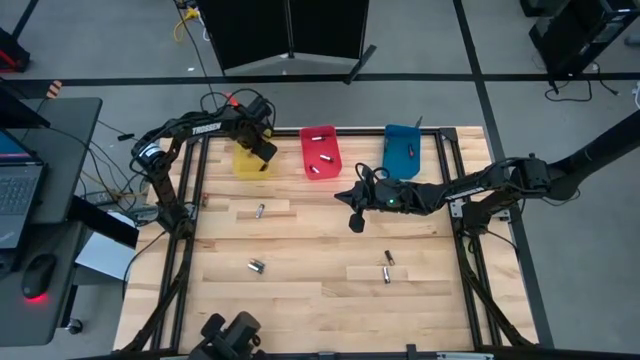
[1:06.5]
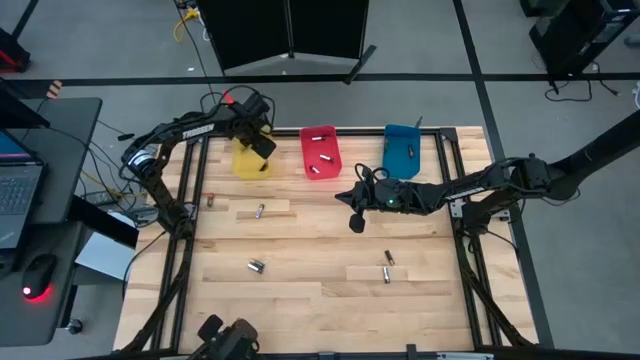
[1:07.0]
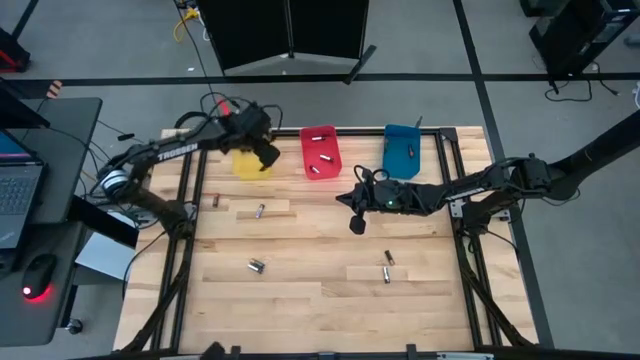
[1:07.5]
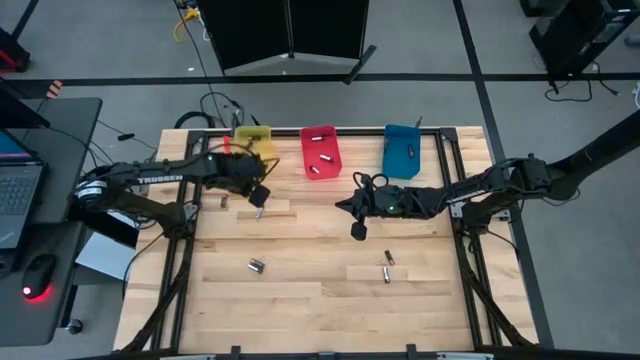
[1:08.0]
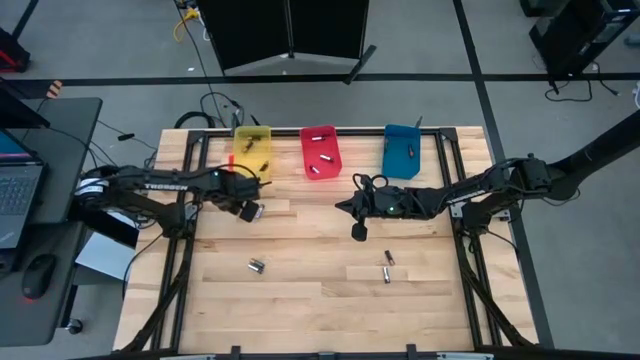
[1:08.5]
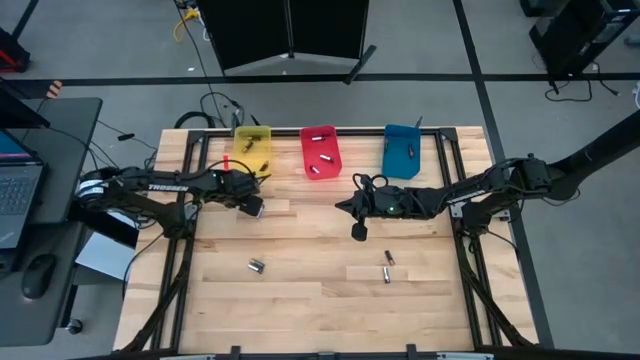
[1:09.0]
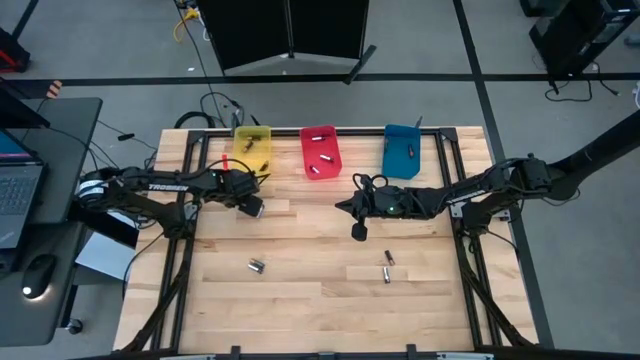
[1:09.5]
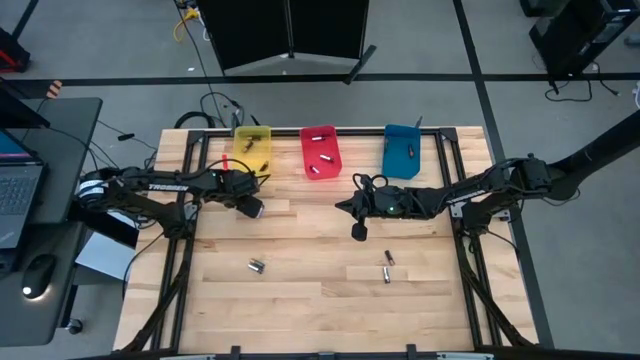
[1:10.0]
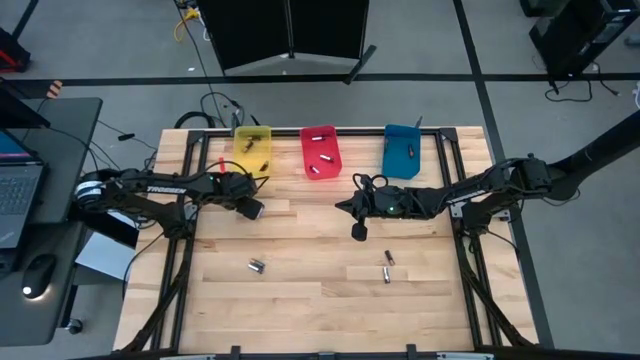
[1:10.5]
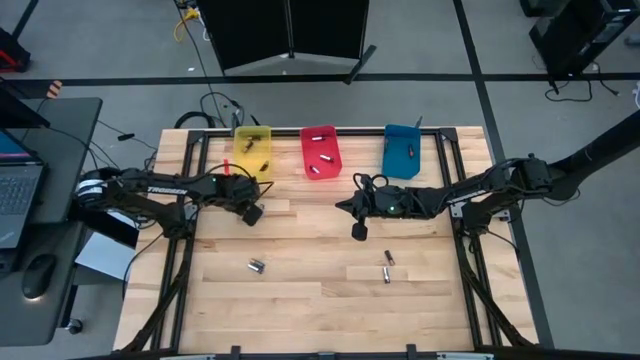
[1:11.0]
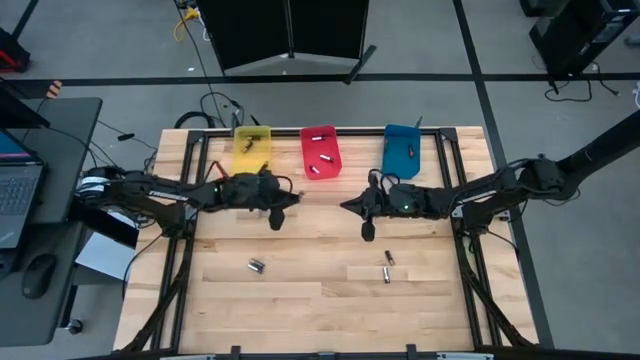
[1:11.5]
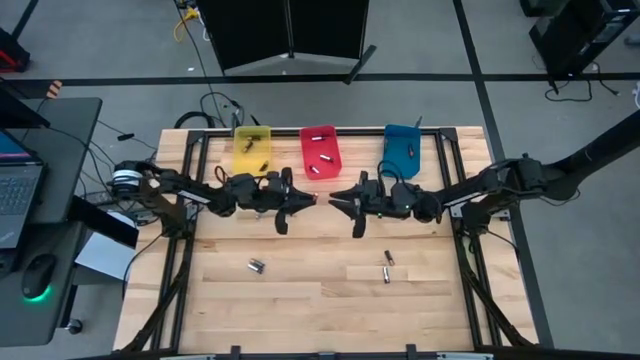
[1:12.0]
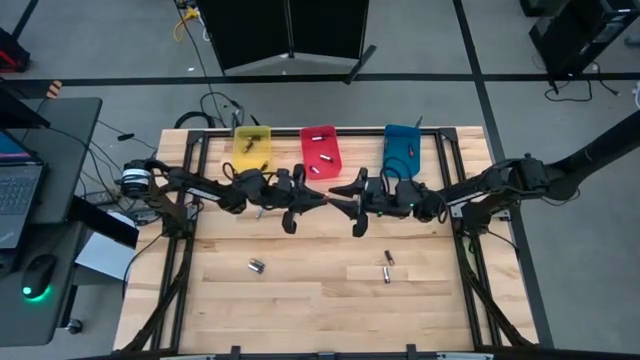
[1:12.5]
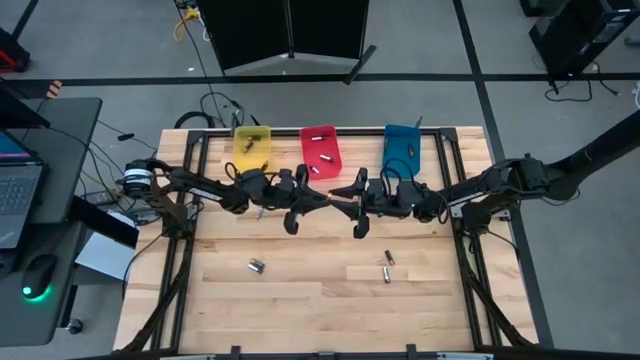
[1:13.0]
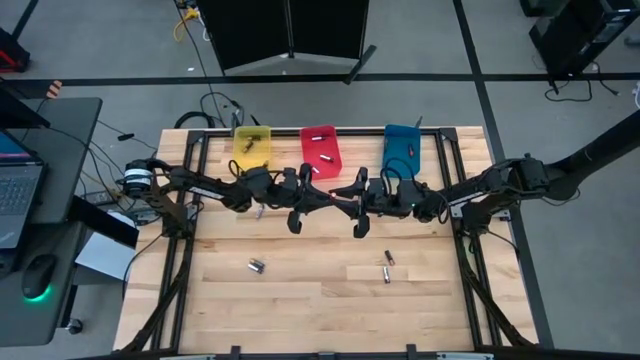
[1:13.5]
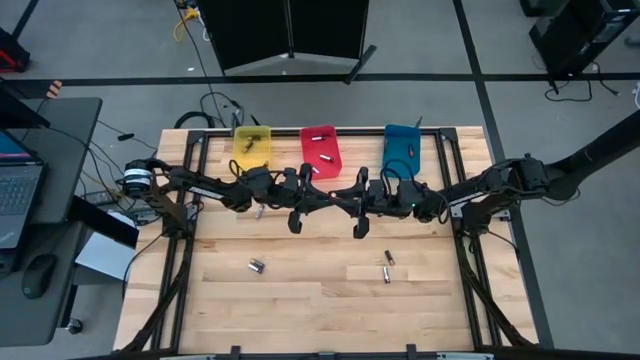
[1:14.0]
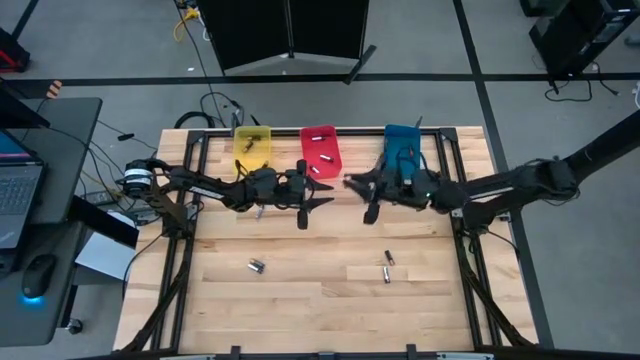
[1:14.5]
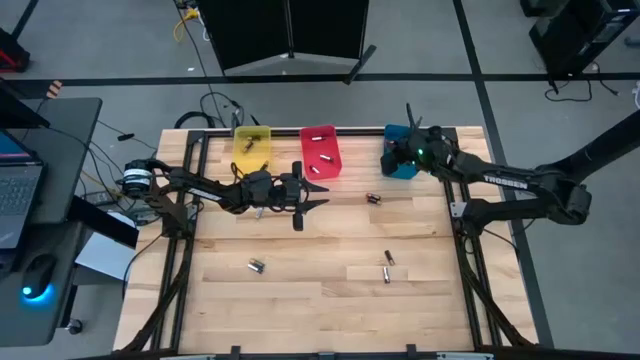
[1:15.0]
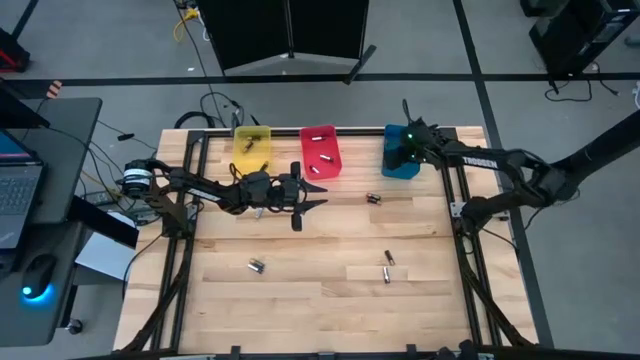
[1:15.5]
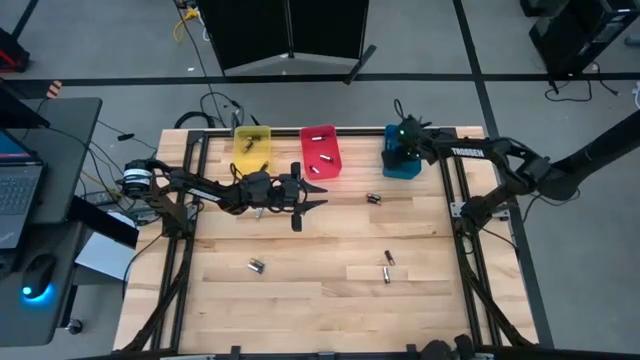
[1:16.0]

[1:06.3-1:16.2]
Task: Sort batteries
Put the left orange battery into the blue bin

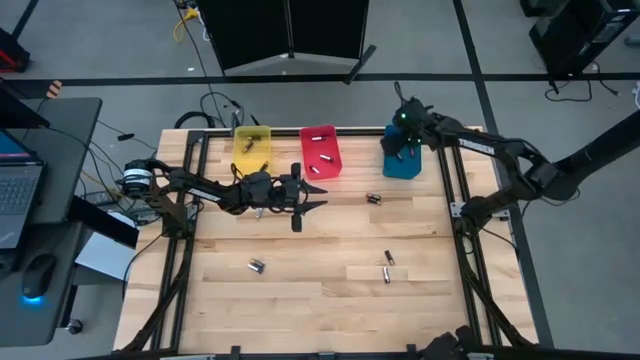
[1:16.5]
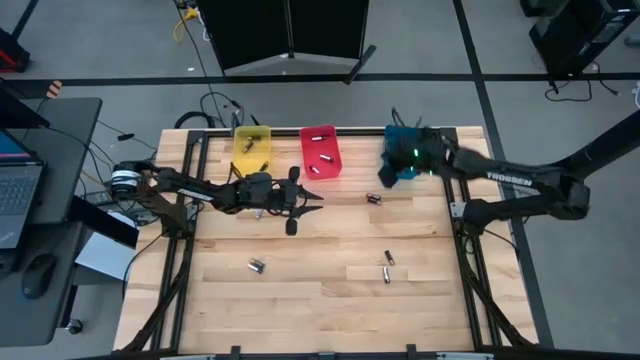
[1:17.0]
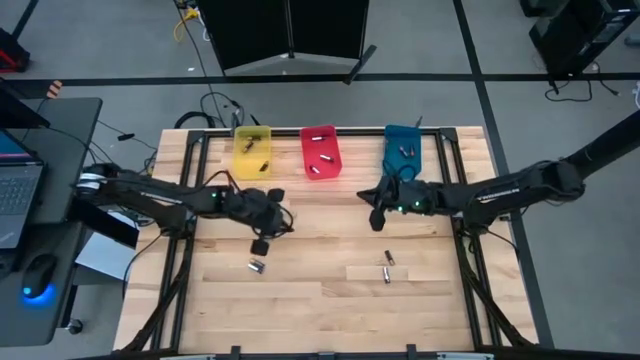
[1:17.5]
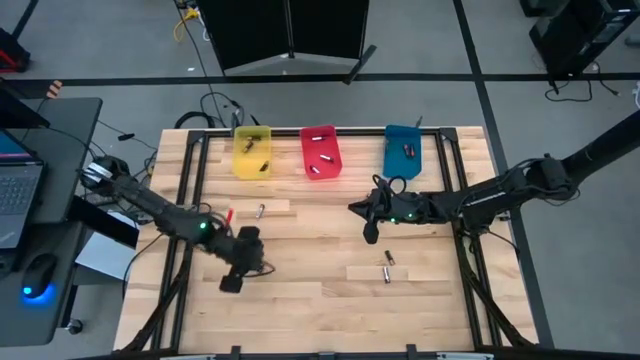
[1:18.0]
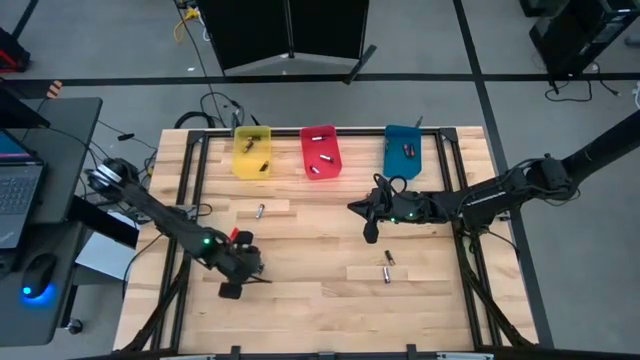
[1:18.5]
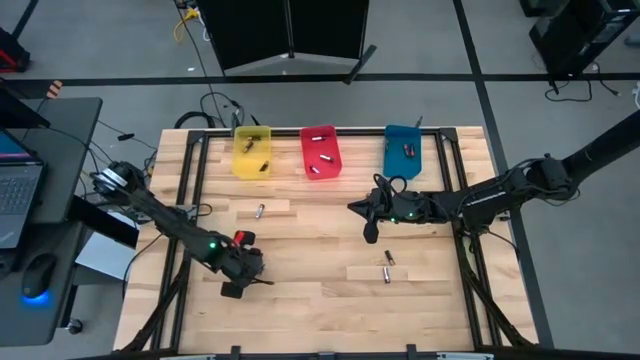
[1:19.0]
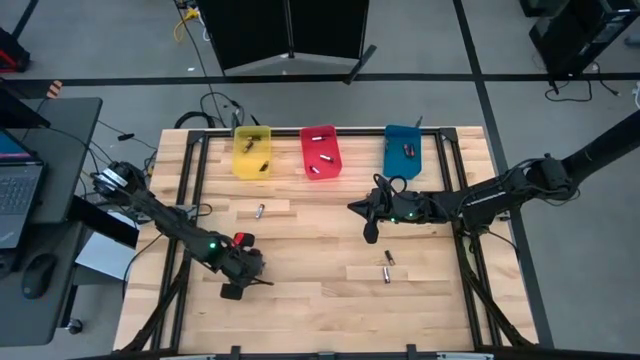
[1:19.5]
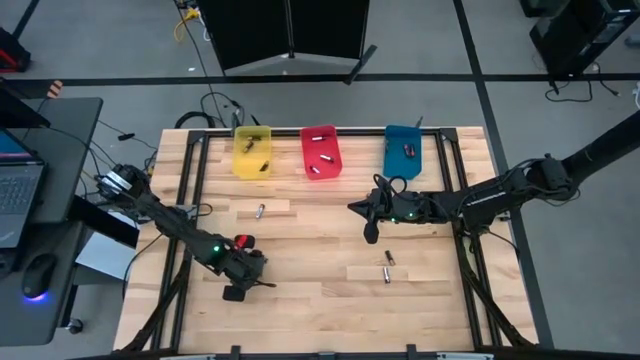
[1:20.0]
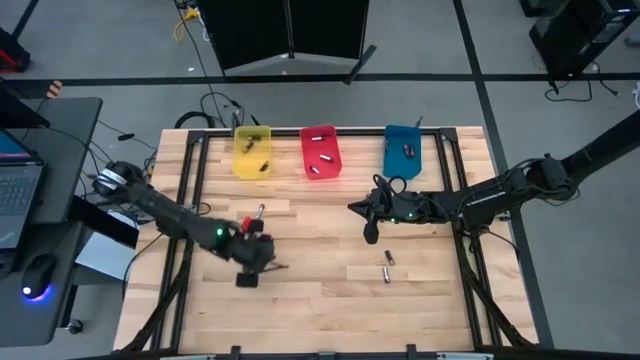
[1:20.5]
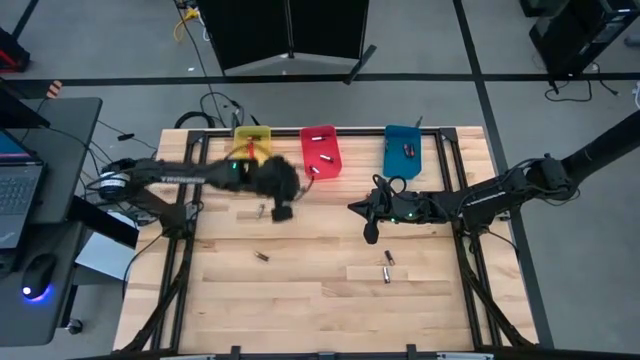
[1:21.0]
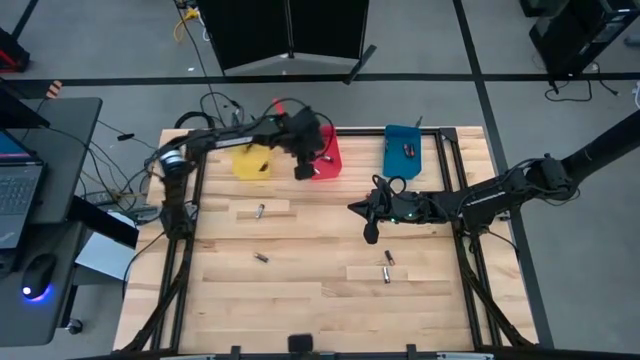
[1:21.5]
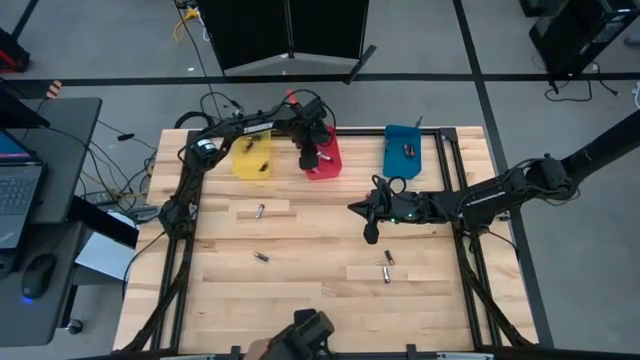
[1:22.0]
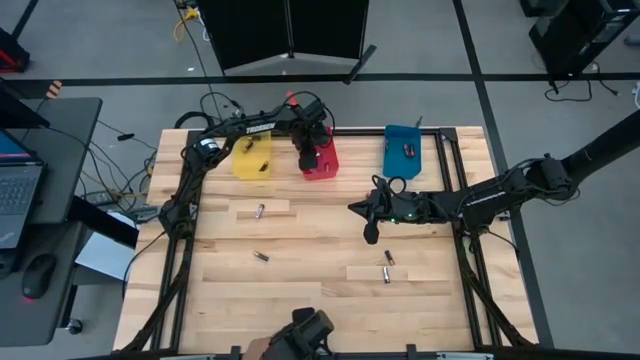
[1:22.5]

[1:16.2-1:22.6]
Put the bottom left silver battery into the red bin

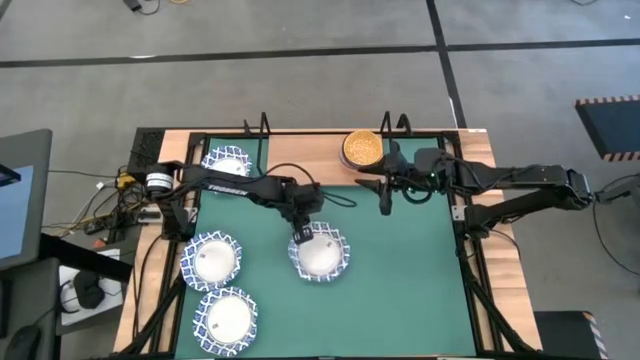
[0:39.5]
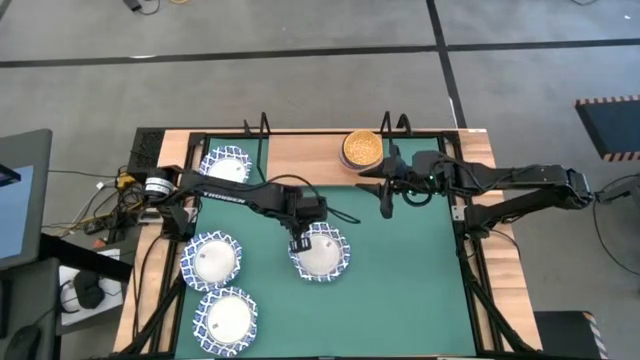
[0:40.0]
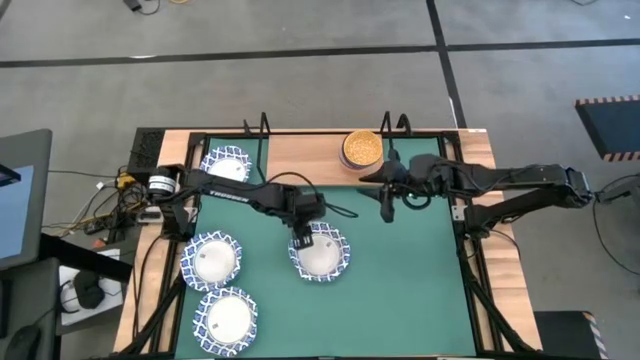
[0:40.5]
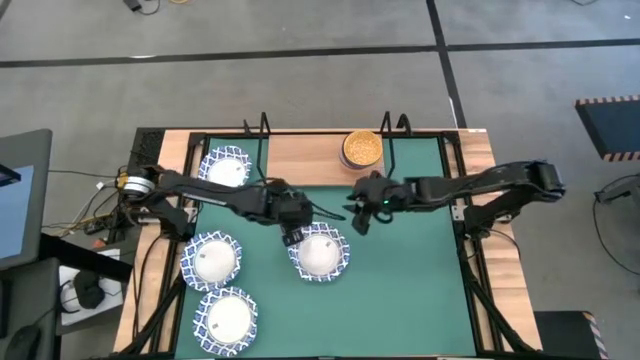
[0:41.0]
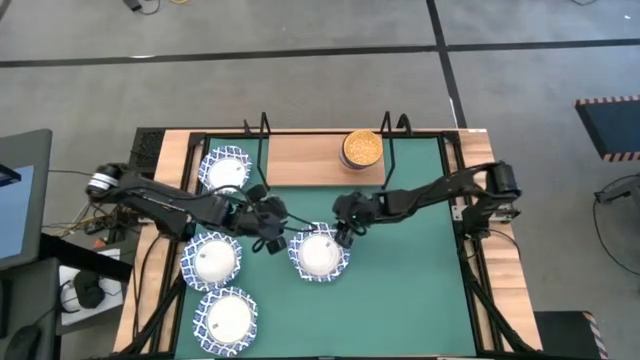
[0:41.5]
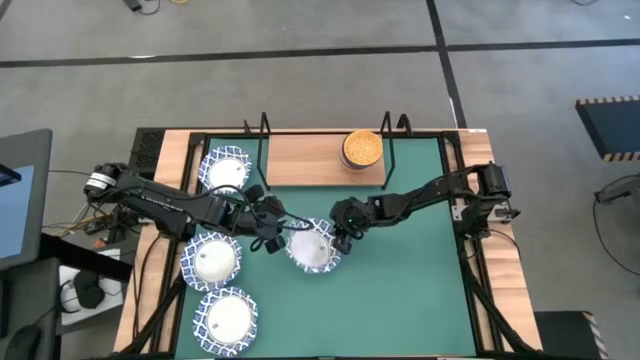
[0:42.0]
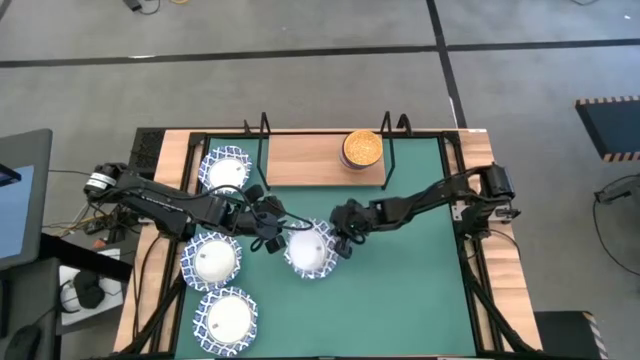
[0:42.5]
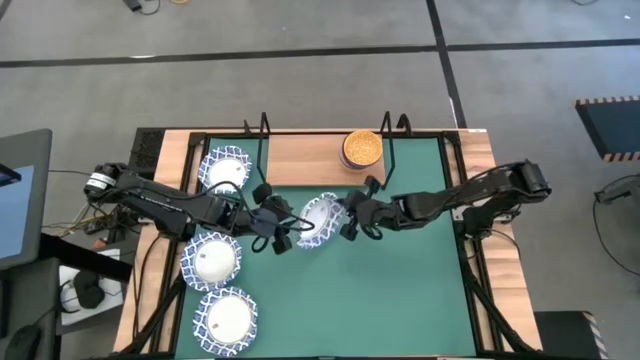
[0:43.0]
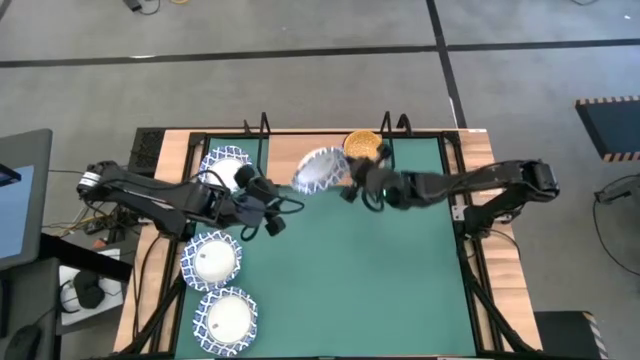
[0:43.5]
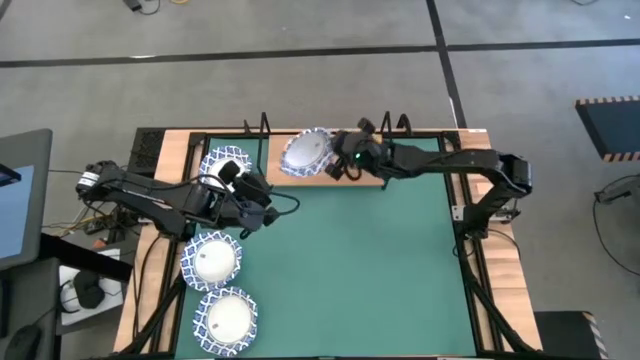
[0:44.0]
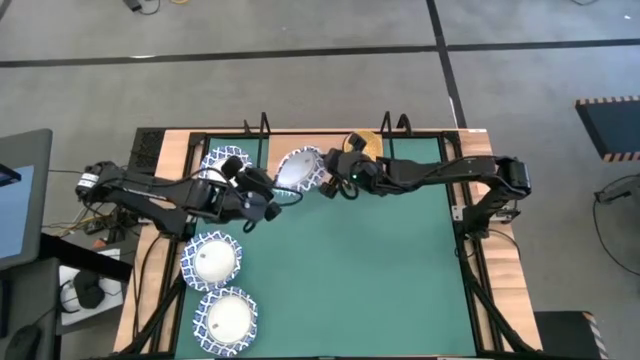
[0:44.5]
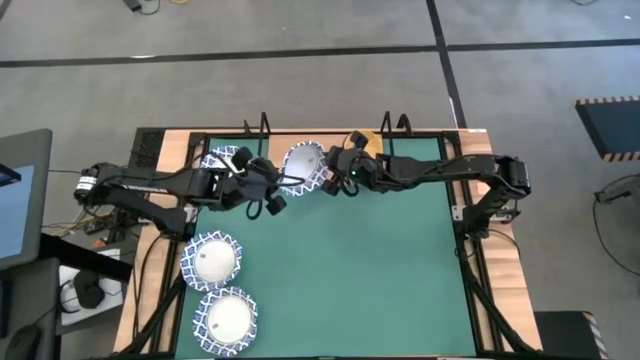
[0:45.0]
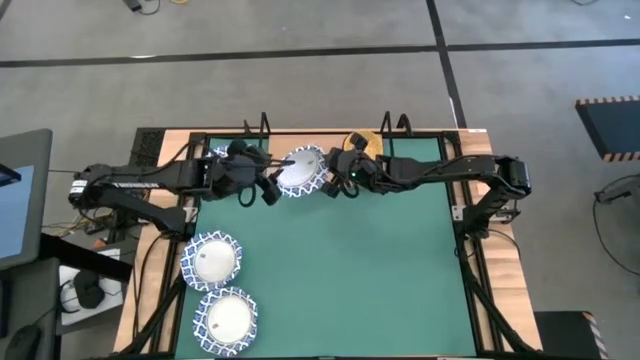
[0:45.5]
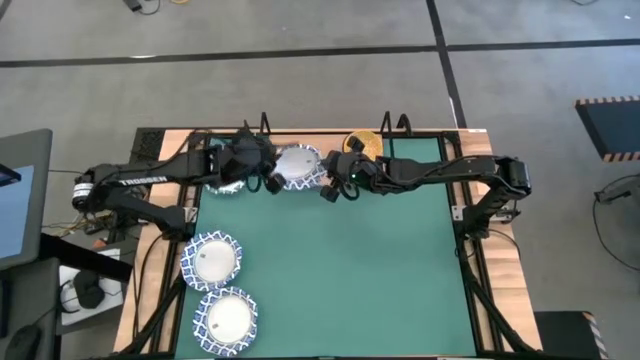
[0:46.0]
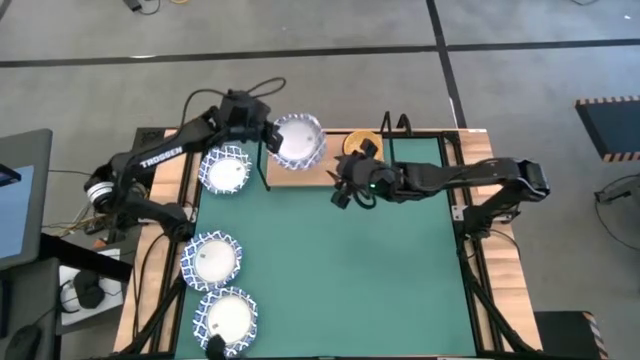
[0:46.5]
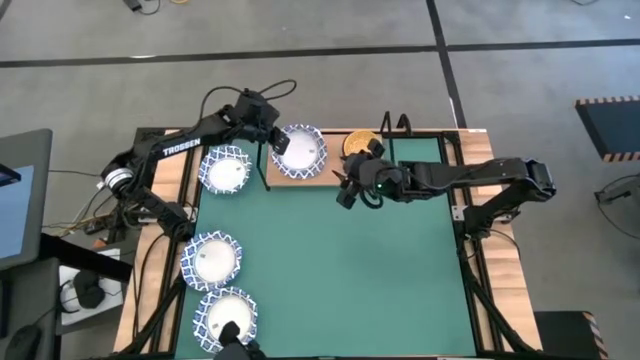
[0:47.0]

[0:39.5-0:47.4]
Task: Place and stack bowls onto a shelf
Put the white patterned bowl on the shelf
